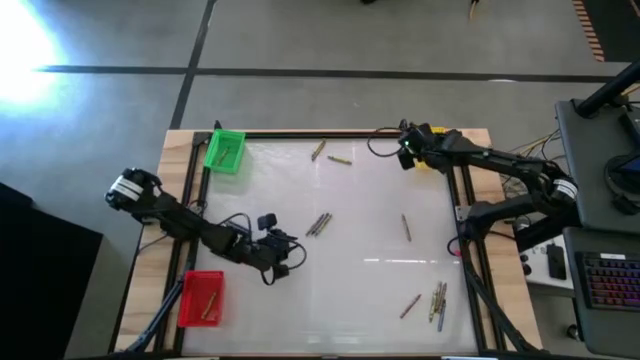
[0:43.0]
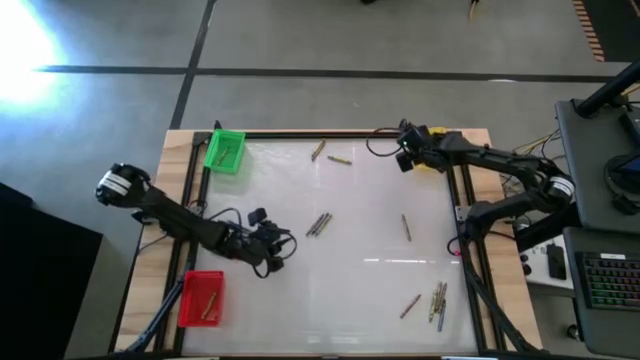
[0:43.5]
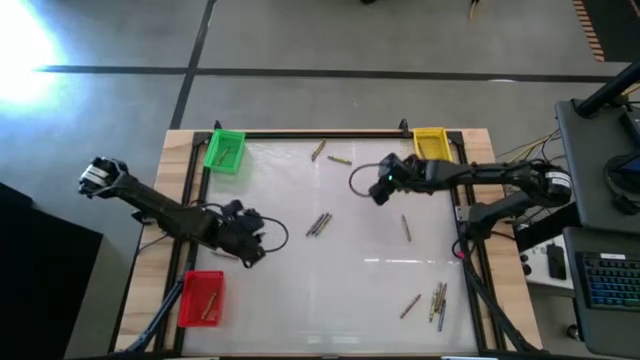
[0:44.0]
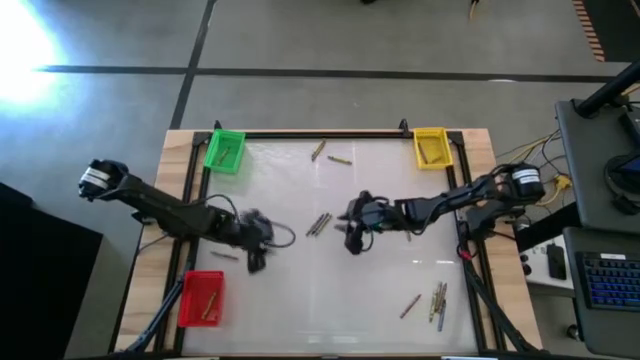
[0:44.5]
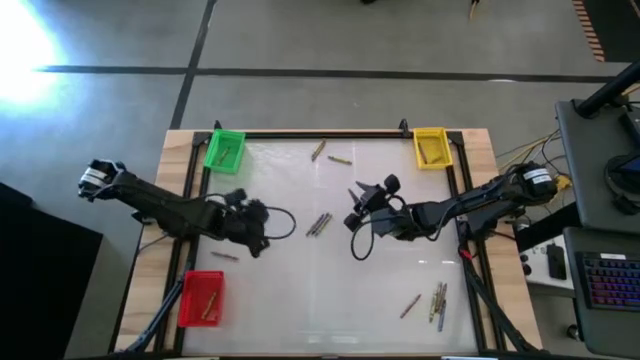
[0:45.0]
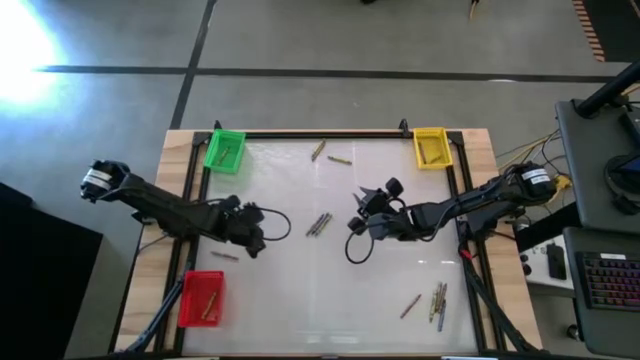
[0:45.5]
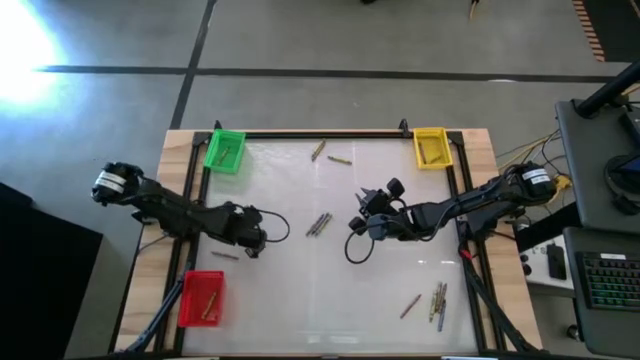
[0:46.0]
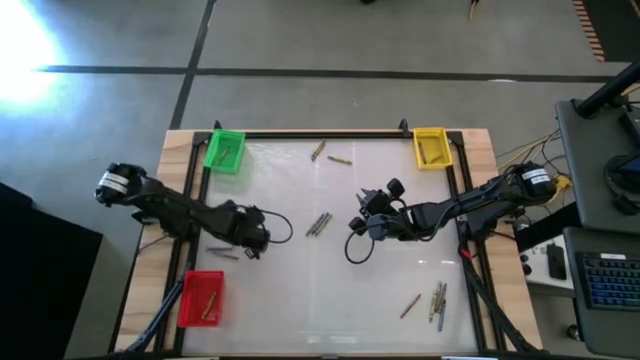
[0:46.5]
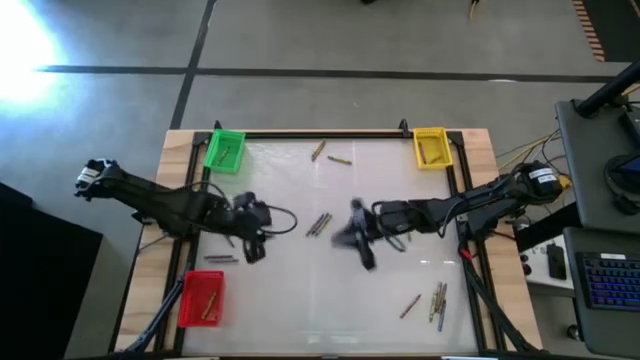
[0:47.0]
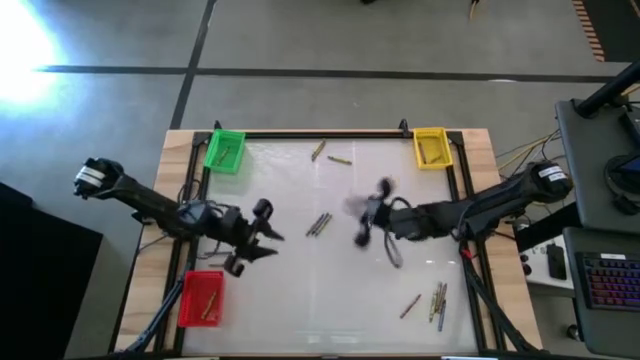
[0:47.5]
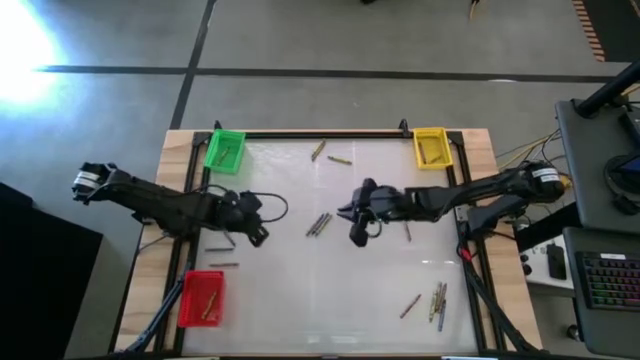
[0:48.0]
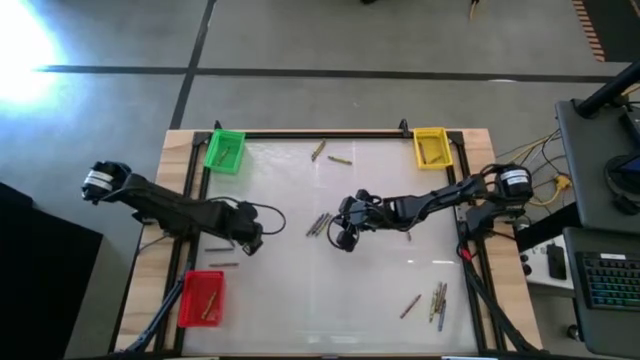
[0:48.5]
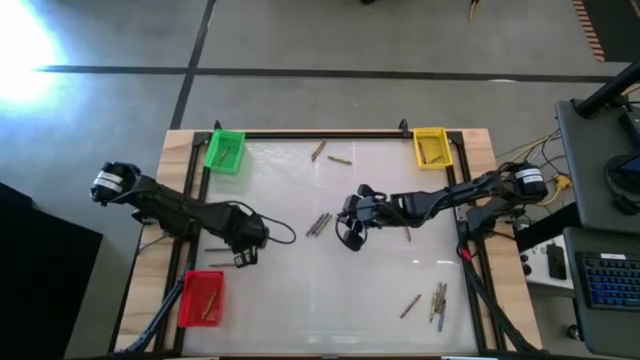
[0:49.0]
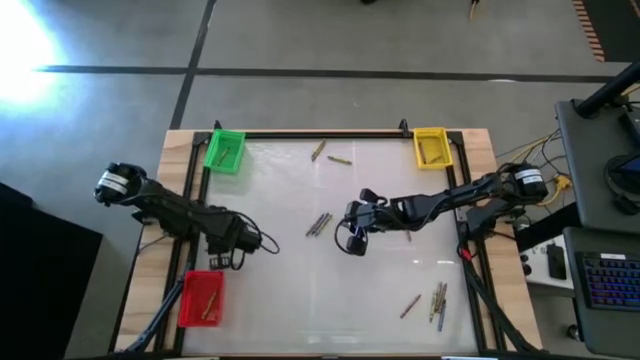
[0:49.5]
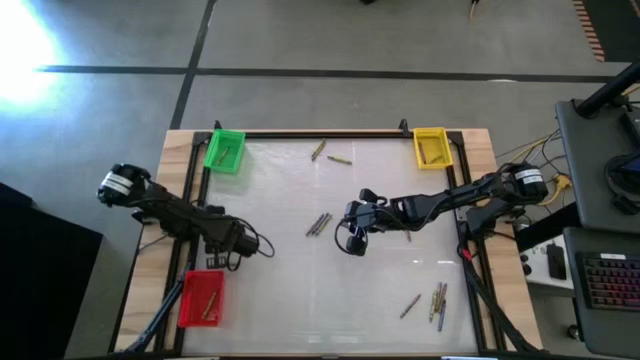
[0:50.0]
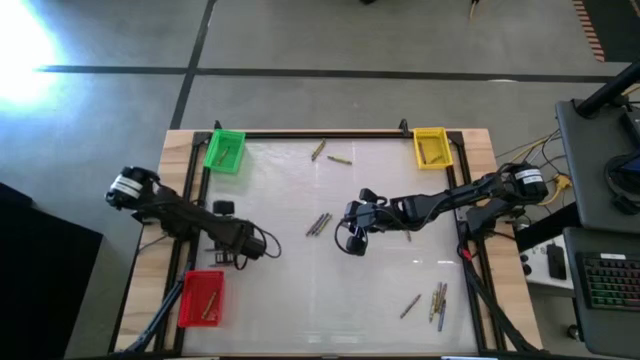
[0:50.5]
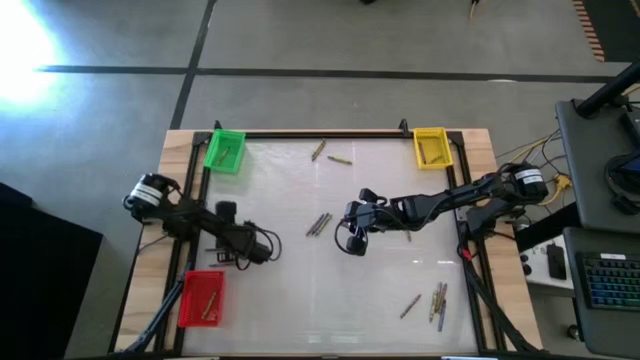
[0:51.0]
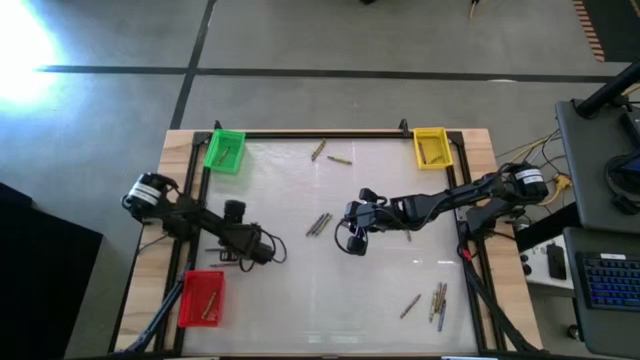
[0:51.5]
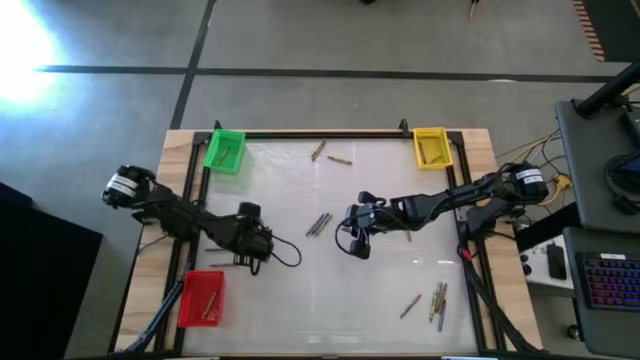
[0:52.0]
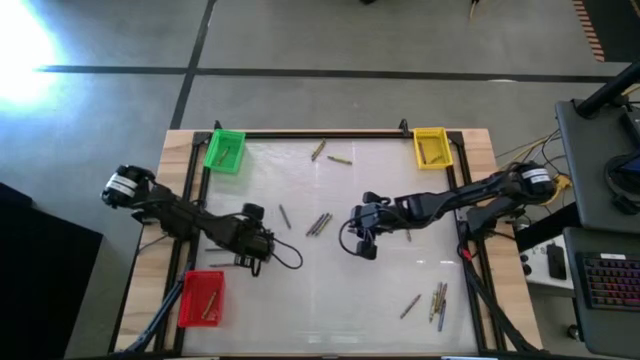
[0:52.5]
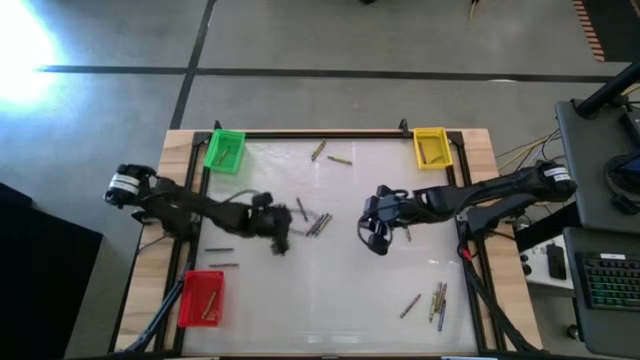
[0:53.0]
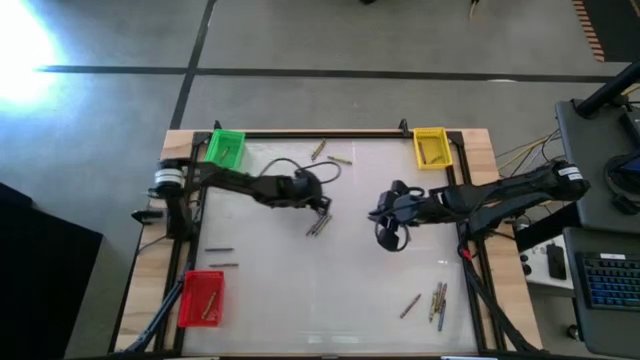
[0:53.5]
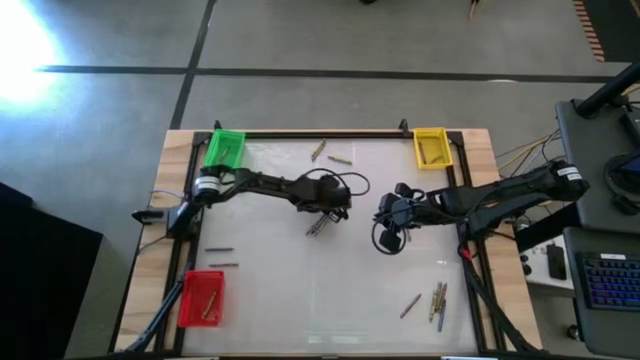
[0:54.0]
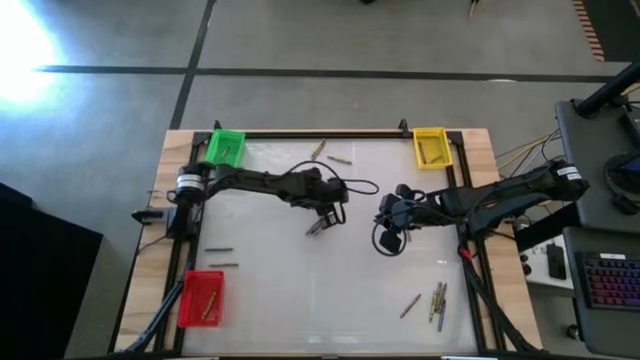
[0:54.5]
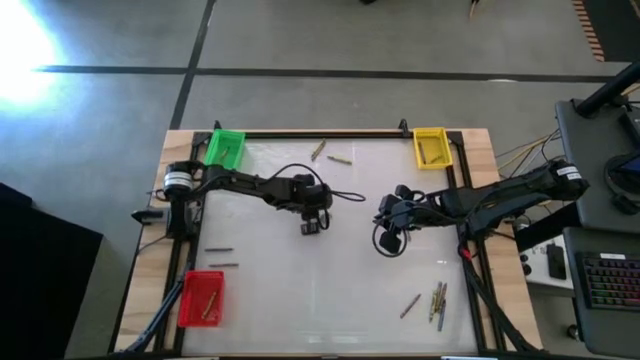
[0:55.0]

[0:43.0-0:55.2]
Task: Sort crayons
Put the blue crayon into the green basket

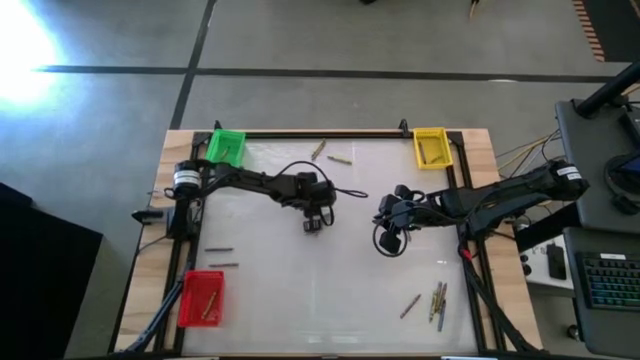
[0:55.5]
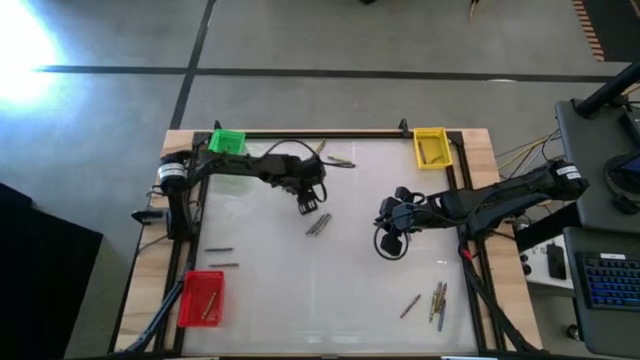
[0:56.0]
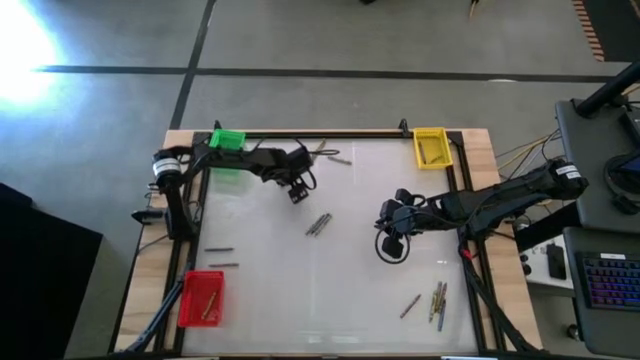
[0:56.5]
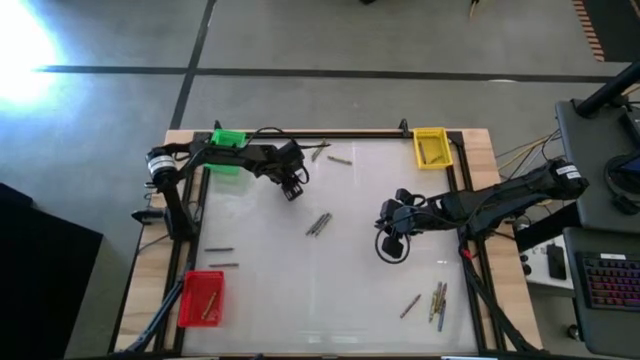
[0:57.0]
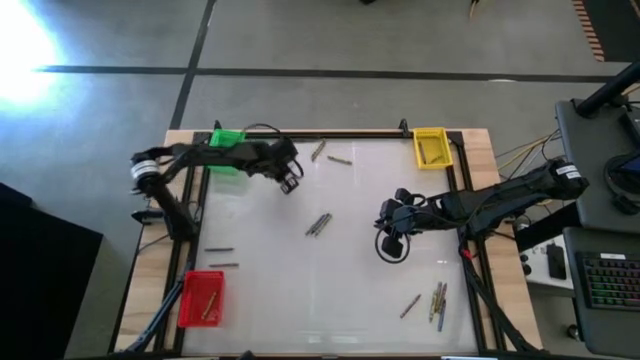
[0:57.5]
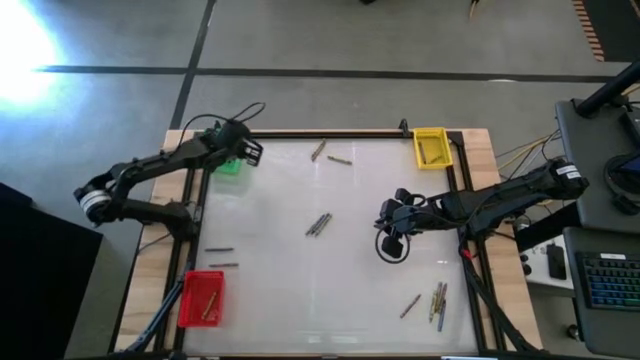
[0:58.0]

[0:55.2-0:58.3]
Put the blue crayon into the green basket

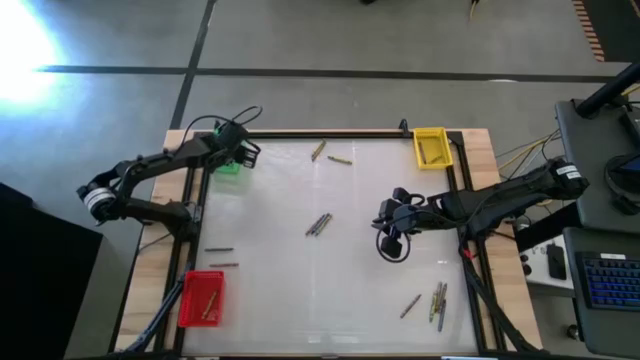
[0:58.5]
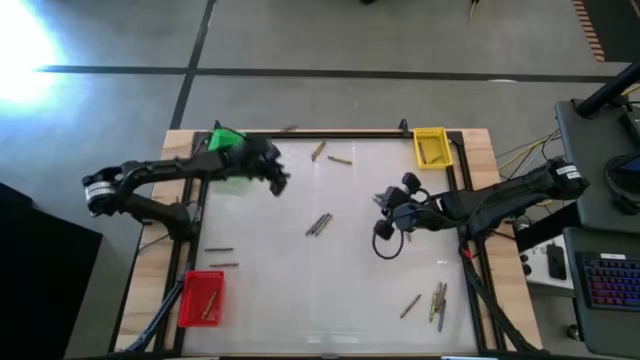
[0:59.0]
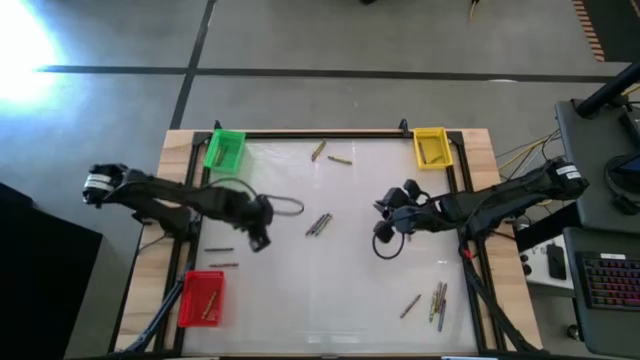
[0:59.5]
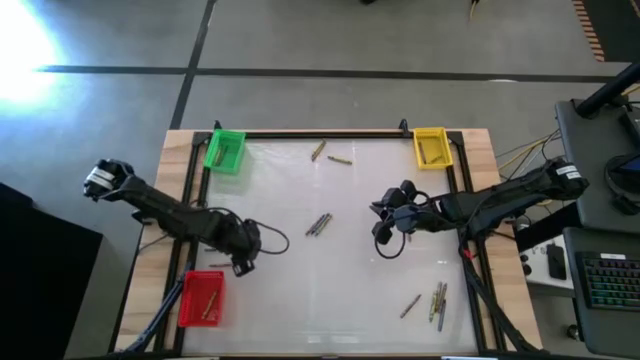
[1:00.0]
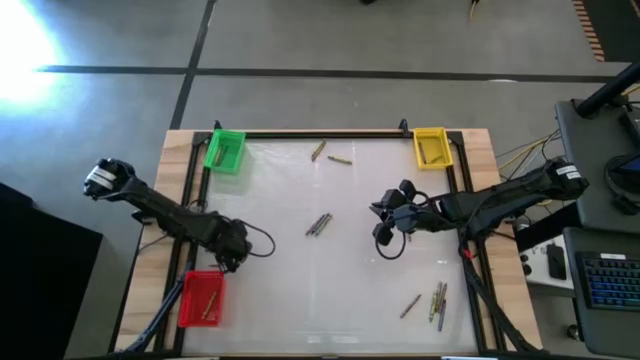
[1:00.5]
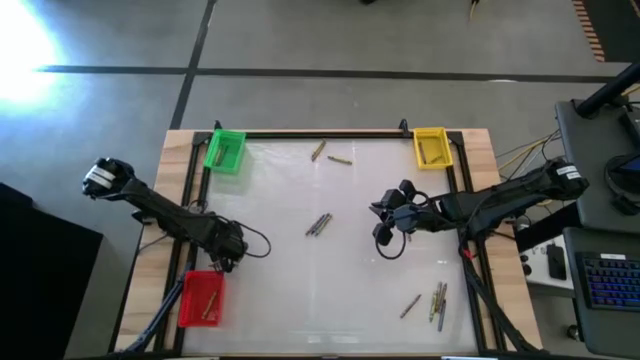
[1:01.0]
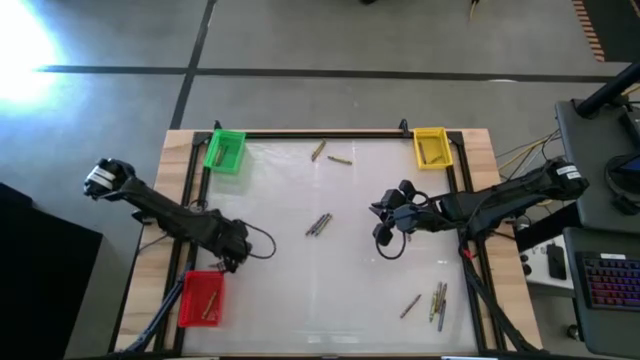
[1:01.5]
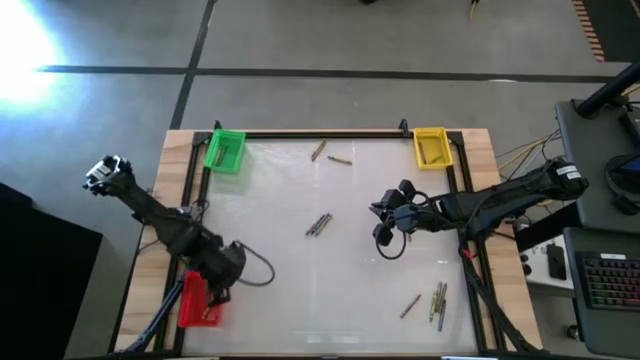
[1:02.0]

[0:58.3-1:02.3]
Put the blue crayon into the red basket

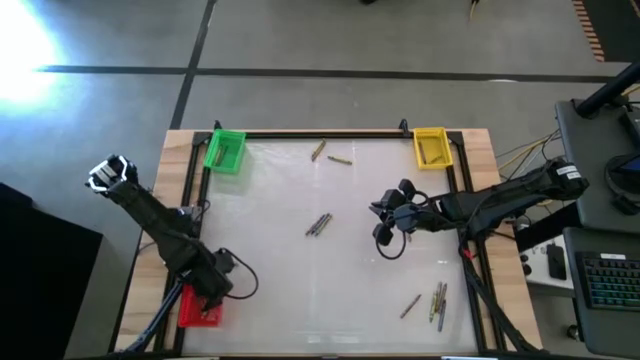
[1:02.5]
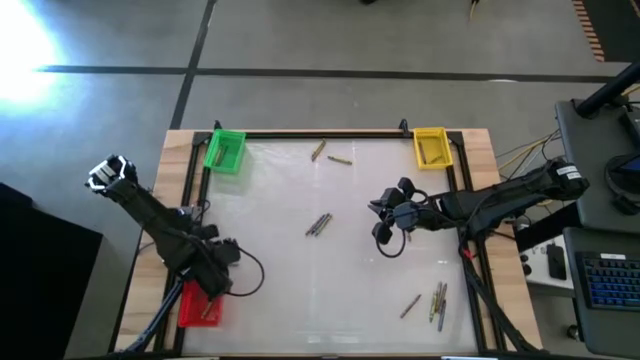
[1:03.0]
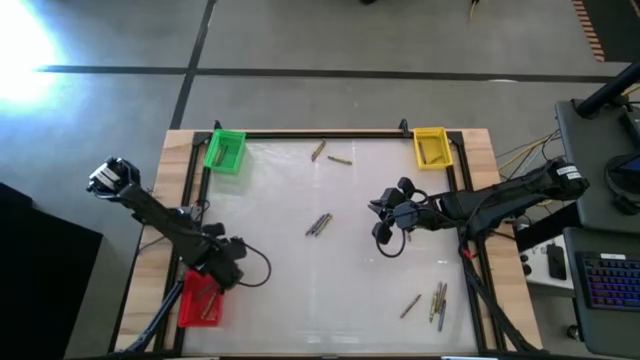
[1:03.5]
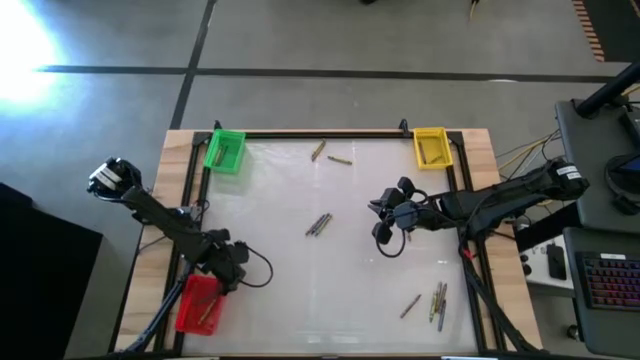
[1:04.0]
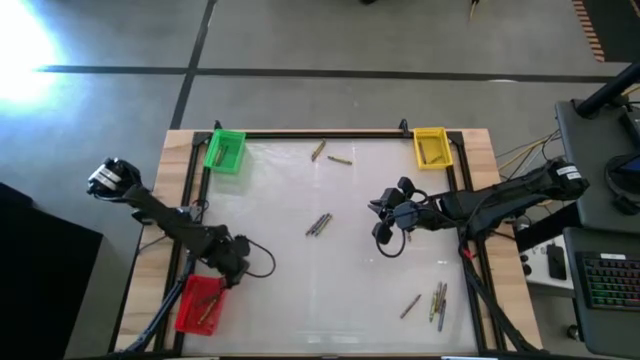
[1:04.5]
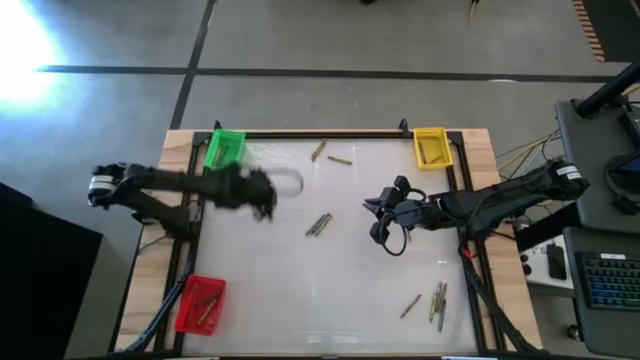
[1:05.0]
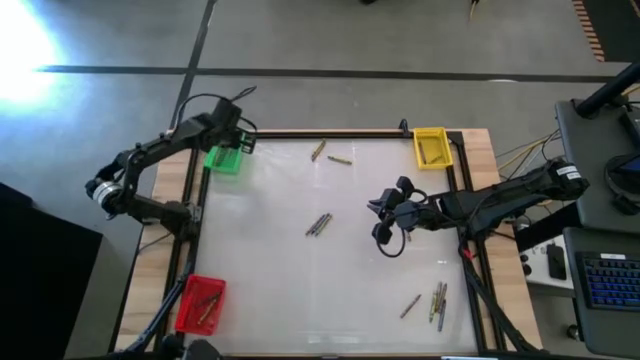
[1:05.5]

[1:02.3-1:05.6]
Put the brown crayon into the green basket
